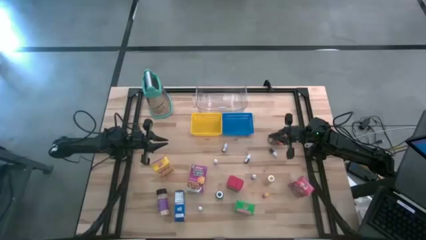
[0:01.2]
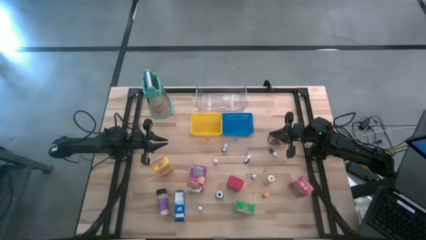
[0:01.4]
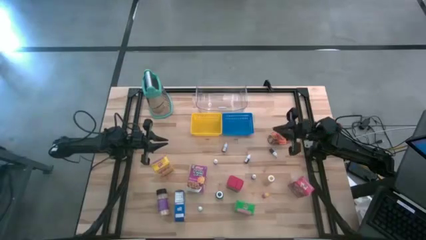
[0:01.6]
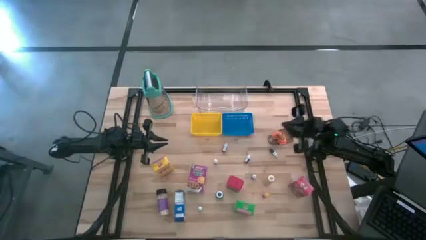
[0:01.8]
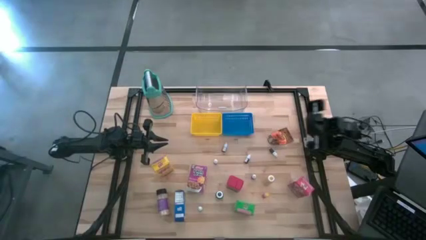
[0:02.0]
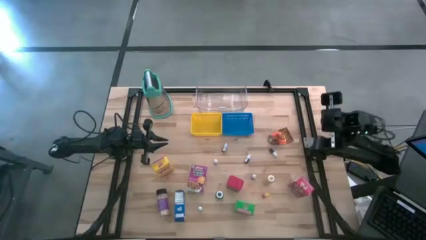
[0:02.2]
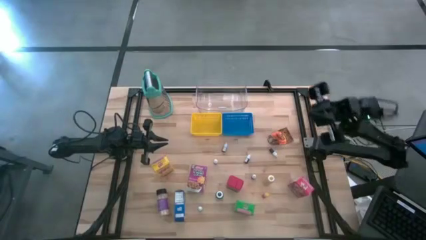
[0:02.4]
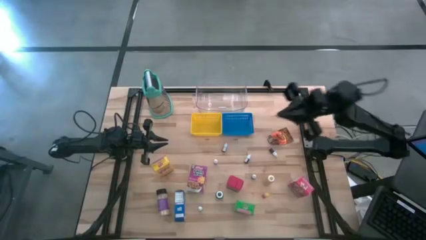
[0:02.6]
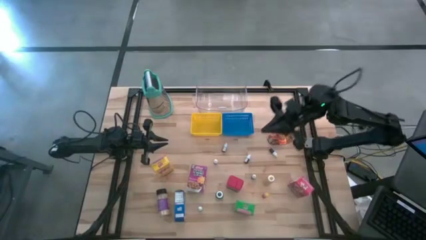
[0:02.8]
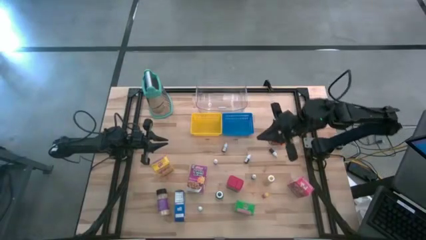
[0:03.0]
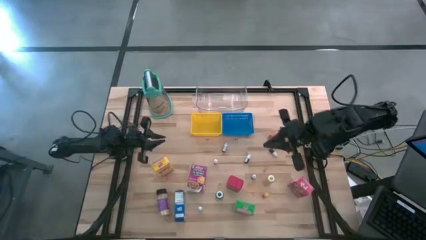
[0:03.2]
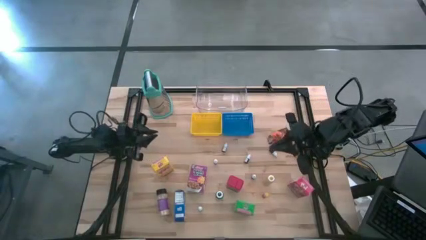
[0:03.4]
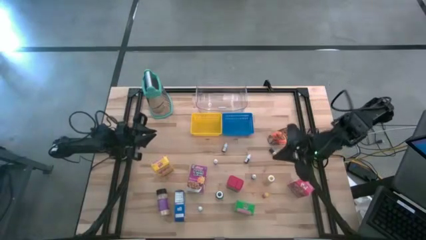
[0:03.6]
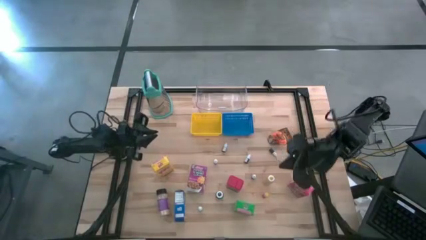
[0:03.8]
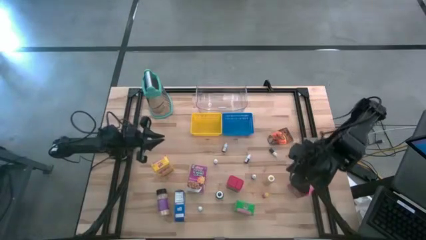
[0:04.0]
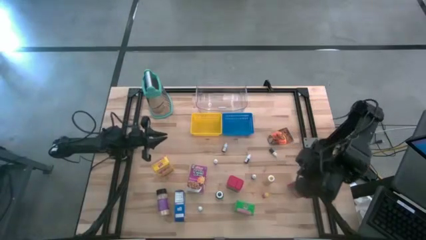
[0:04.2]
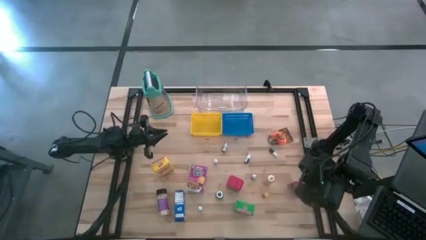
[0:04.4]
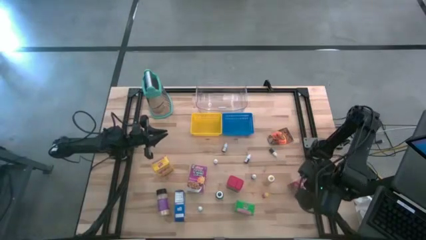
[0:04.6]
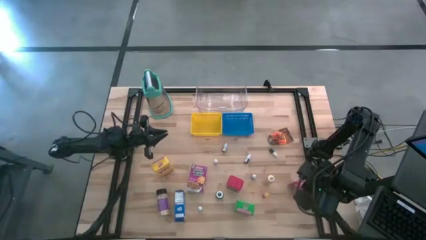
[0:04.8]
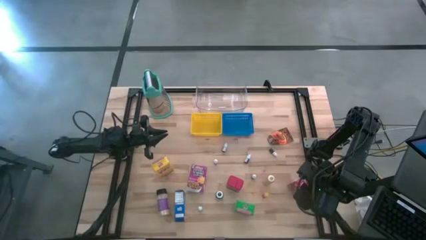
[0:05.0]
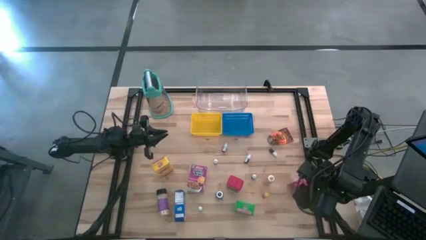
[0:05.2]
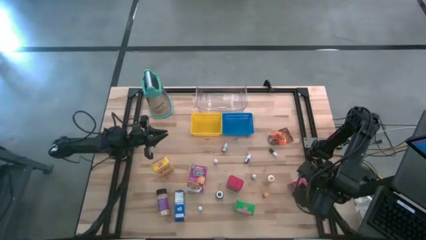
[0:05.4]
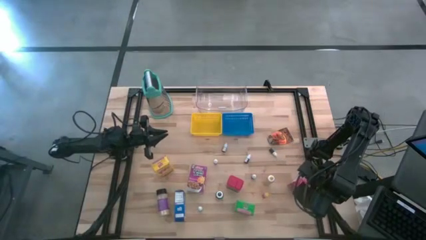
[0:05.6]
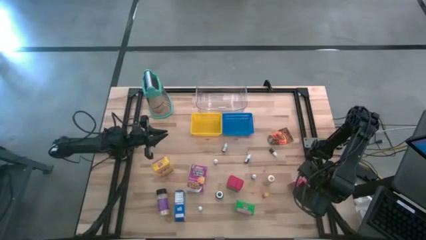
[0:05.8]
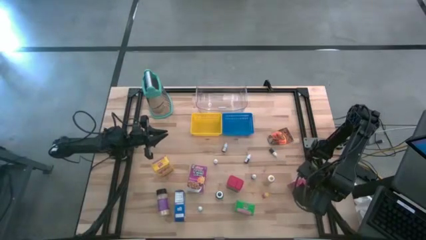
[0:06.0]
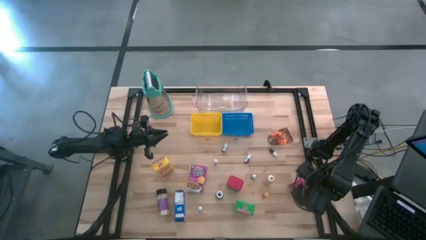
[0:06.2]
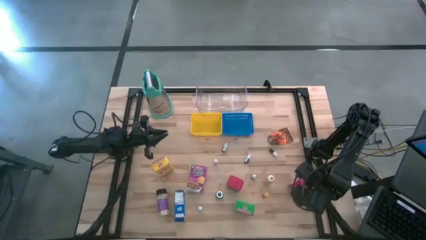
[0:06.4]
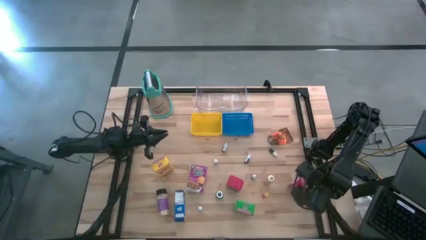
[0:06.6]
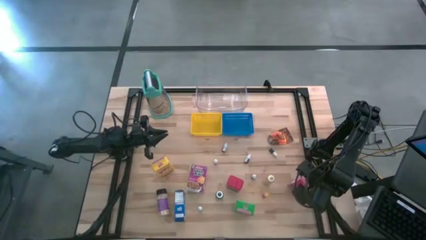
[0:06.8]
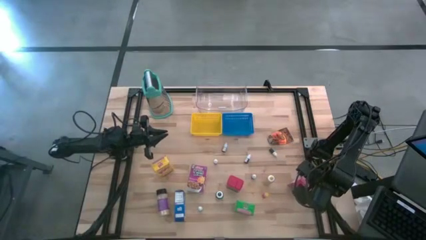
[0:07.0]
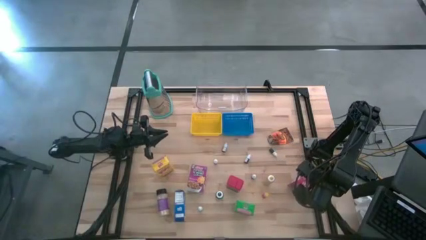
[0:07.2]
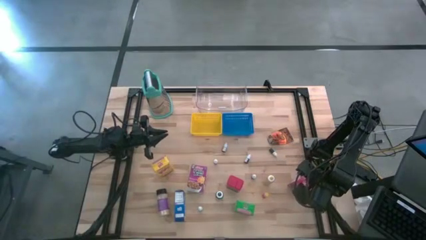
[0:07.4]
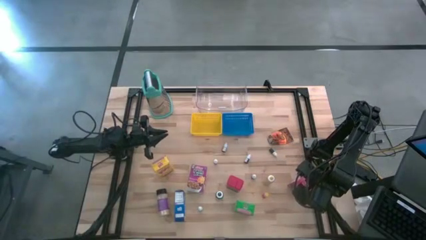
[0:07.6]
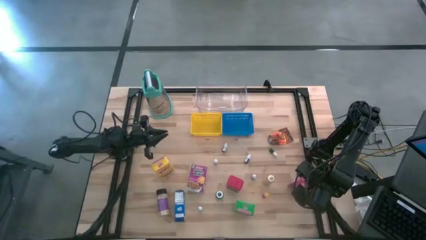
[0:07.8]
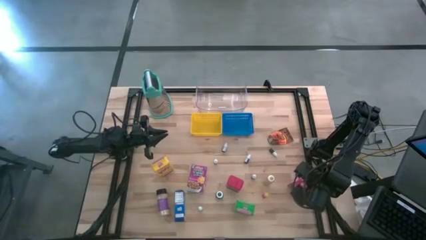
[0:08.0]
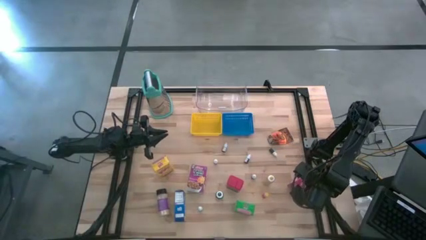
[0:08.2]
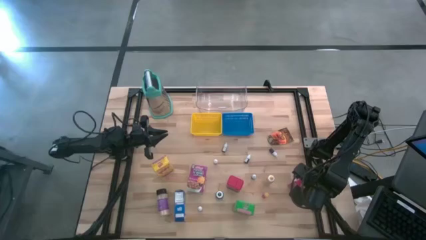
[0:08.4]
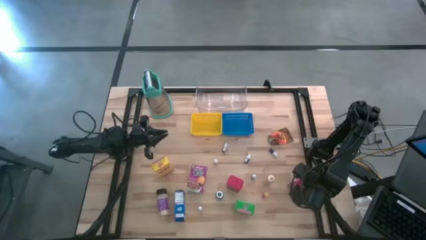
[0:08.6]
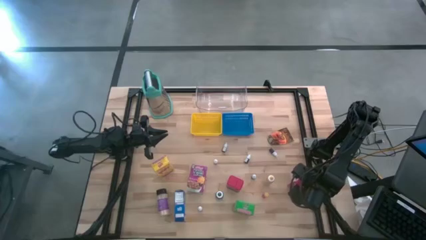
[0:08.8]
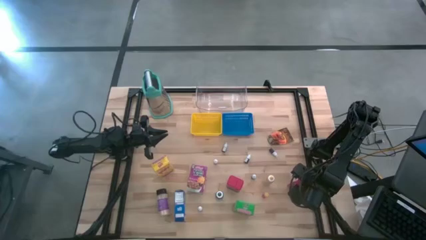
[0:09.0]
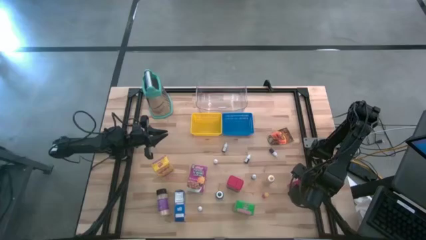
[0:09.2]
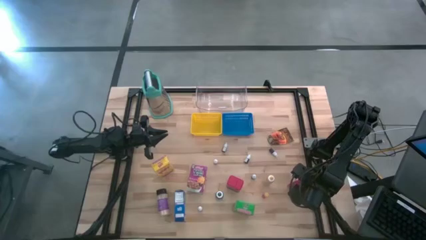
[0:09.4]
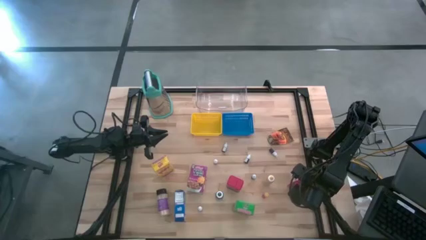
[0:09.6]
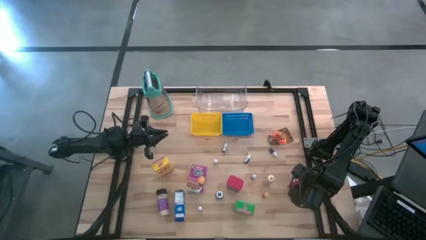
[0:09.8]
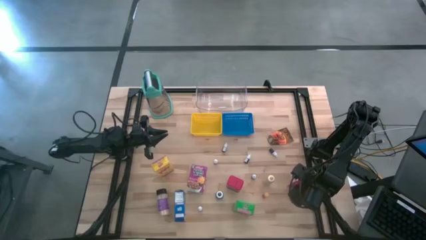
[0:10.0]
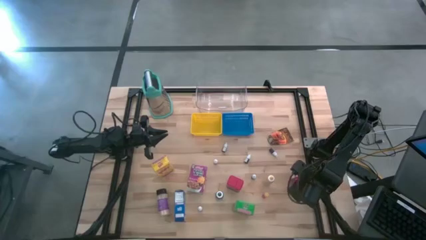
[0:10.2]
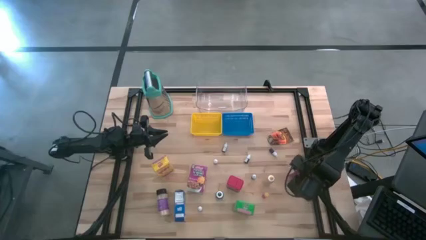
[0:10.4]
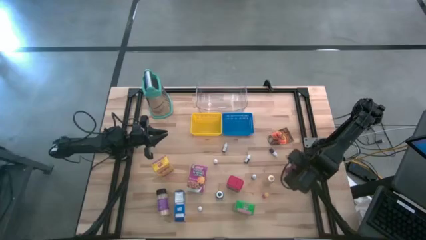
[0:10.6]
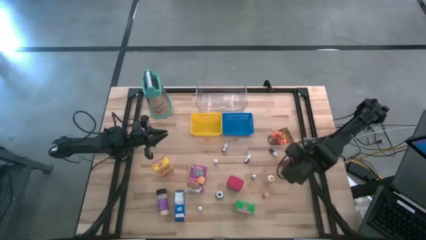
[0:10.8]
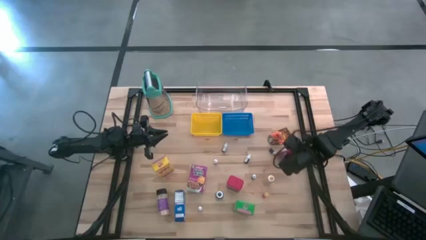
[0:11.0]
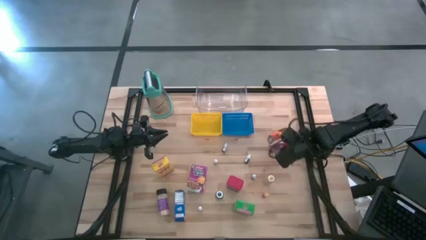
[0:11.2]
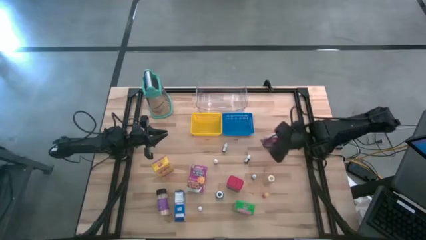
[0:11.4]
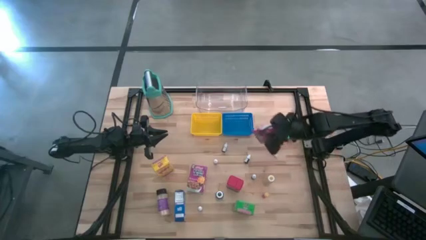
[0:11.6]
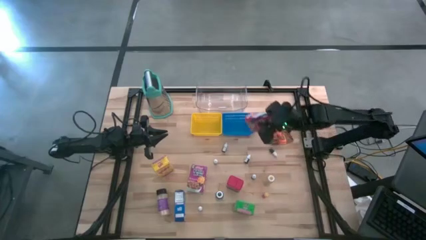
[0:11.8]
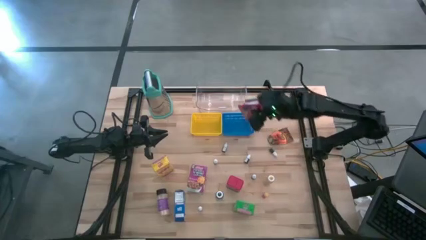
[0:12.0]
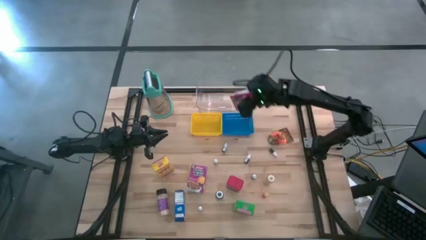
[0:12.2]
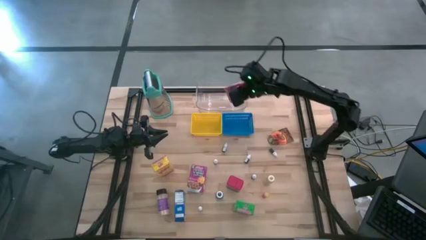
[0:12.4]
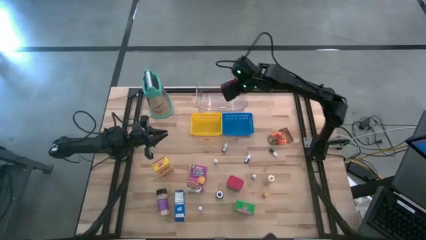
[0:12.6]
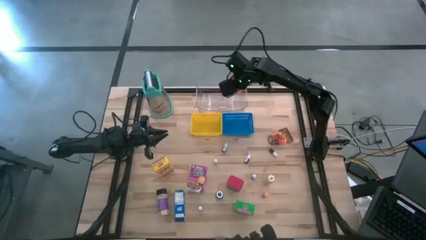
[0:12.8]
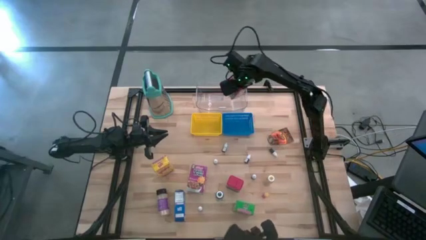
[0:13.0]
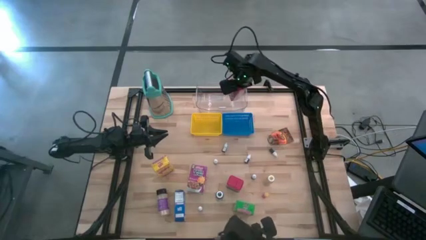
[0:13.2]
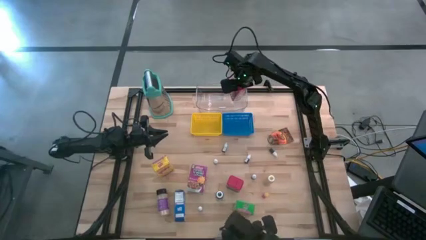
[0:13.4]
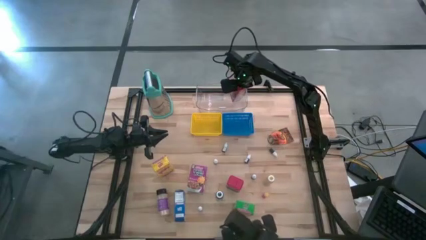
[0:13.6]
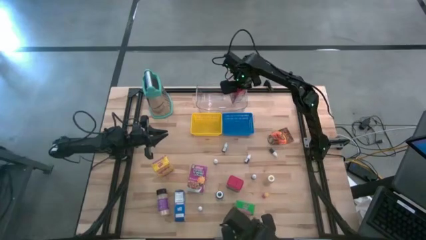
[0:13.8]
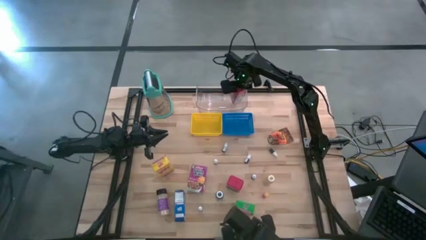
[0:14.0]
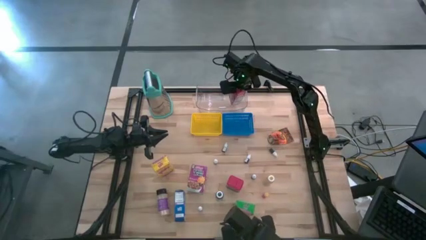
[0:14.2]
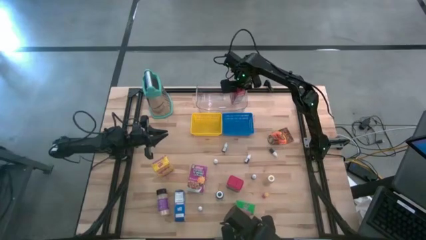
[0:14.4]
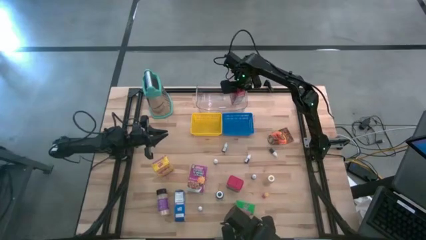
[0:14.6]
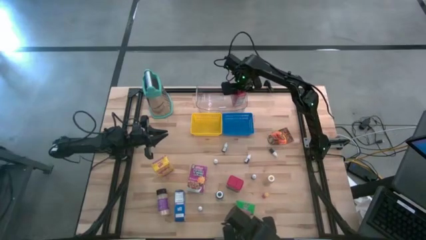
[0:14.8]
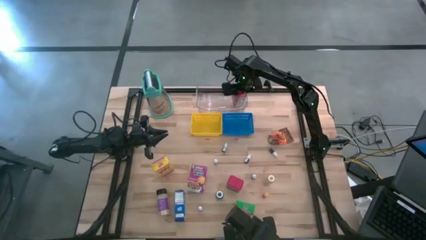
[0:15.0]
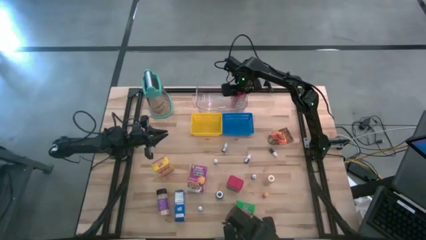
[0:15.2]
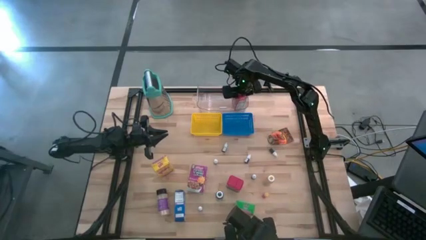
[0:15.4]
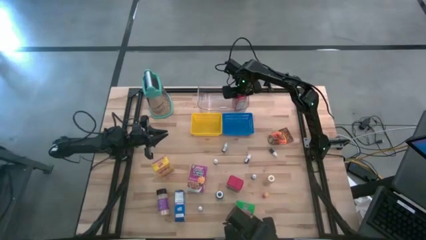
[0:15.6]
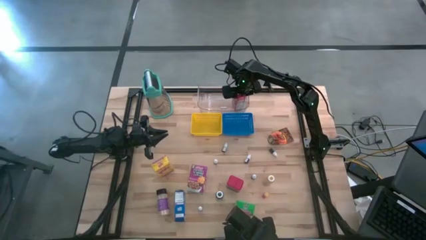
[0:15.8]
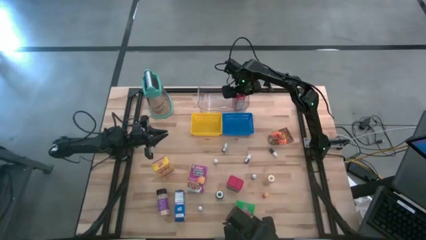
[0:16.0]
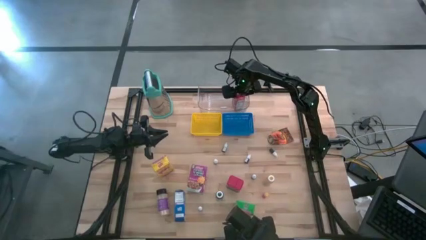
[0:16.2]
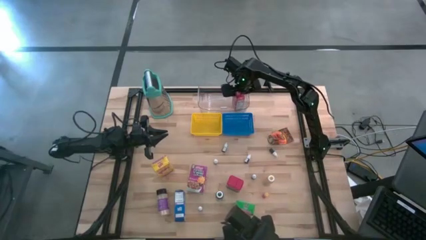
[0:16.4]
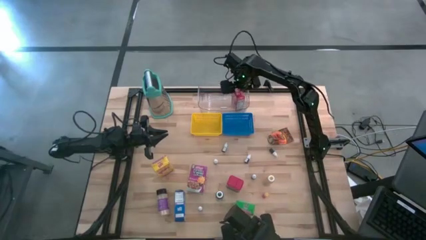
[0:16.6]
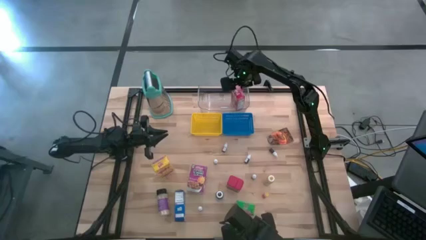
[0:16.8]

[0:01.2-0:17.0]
Task: Pick & Place Kitchen Items
Put the red cereal box into the transparent bin
